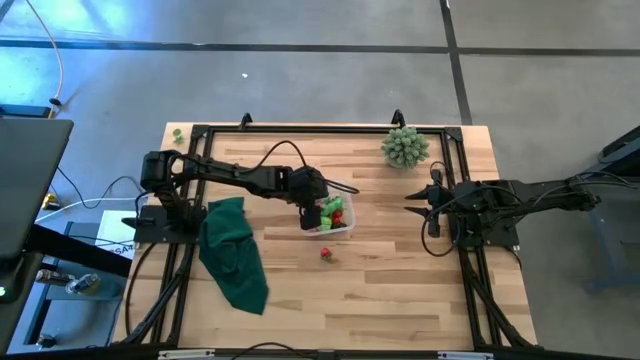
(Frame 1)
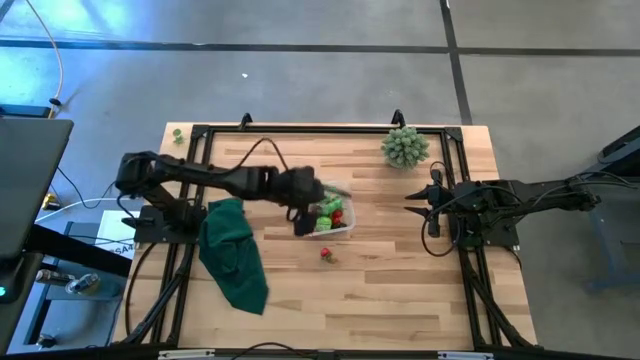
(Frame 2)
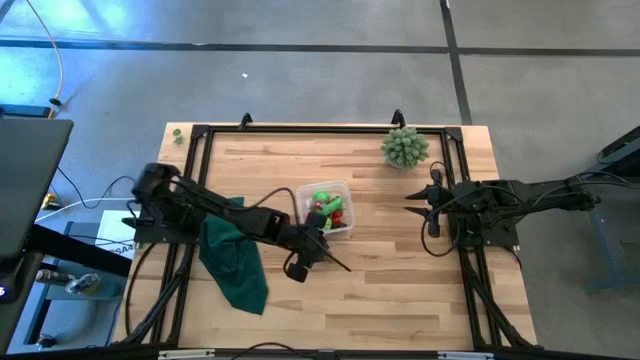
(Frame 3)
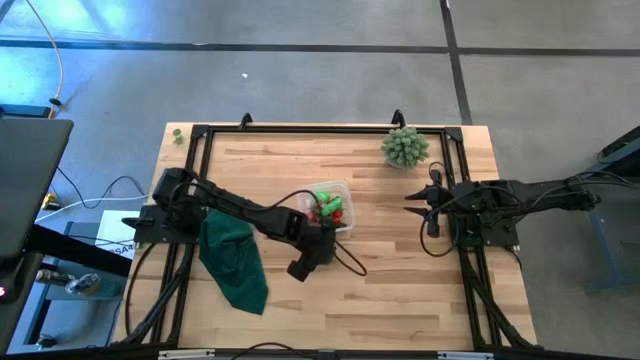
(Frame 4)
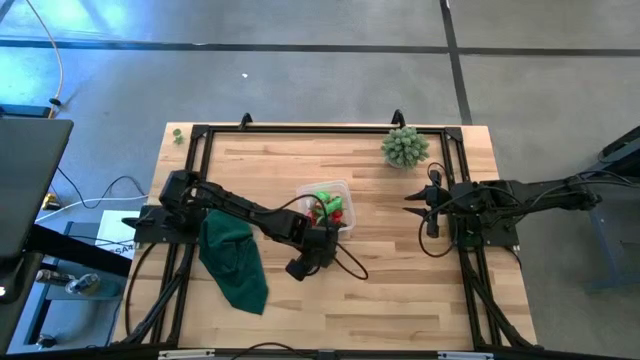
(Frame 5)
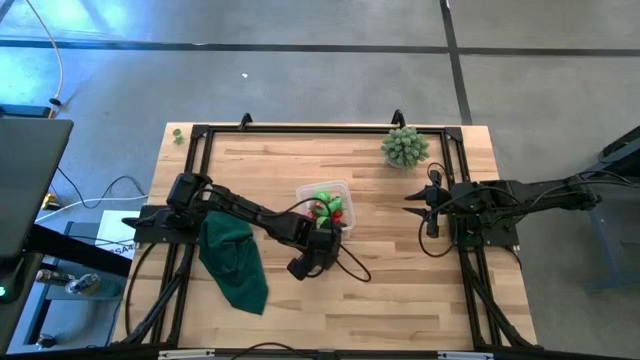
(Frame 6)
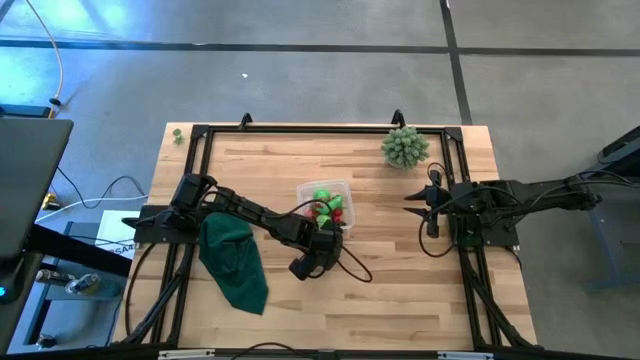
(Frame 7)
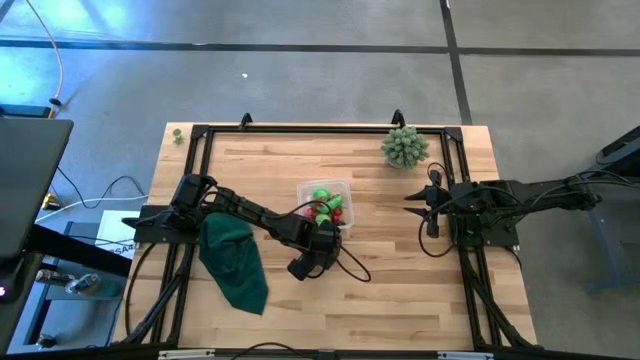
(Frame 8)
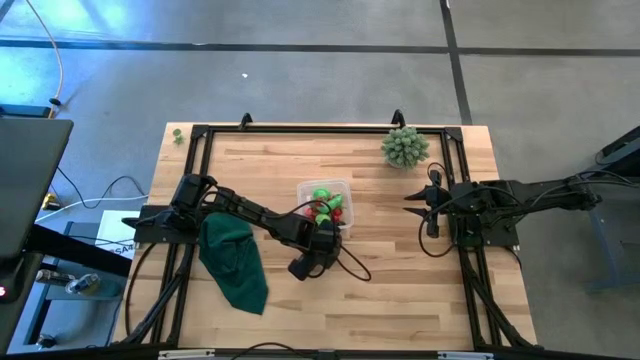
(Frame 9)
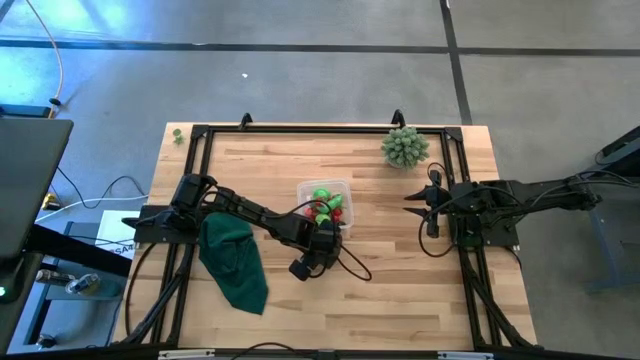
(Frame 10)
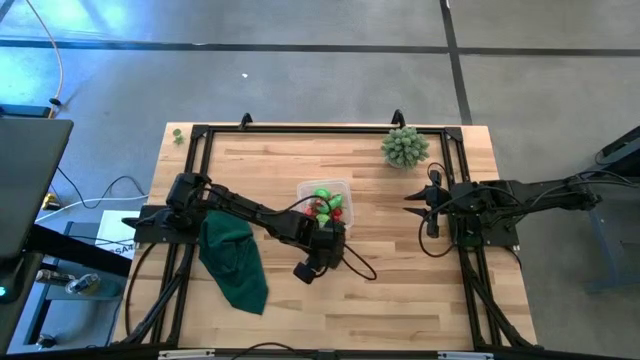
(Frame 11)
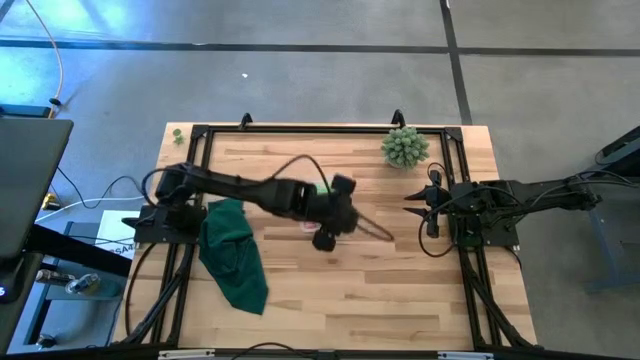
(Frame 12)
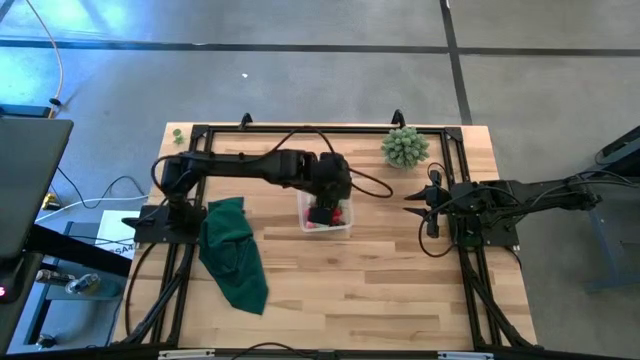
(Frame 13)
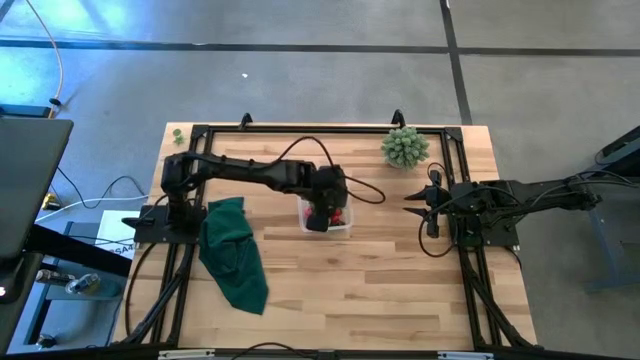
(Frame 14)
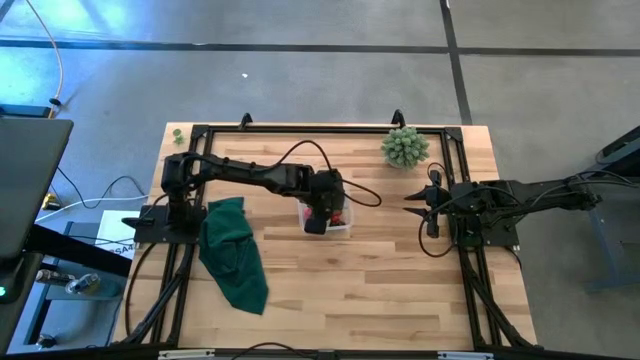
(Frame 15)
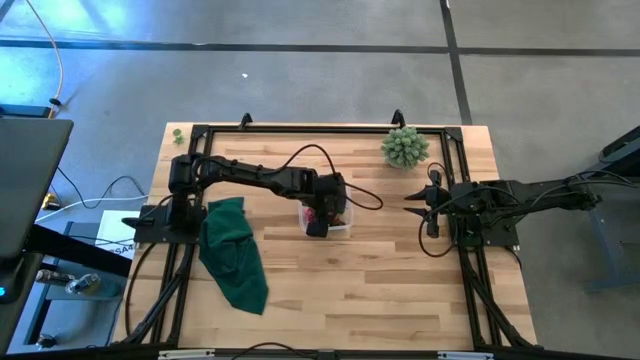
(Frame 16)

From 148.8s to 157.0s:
Task: Pick and placing Produce into tupperware
Put the strawberry into the transparent bin

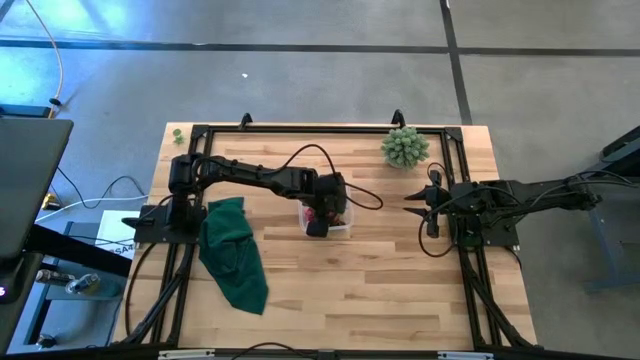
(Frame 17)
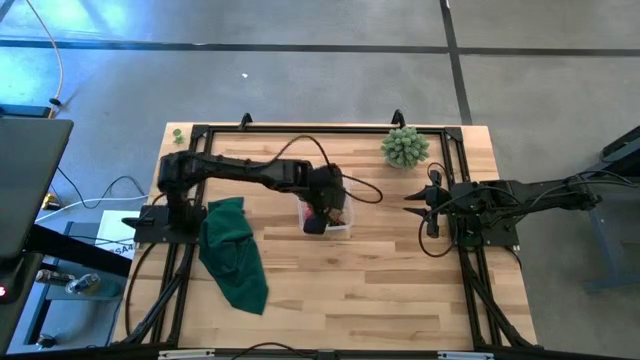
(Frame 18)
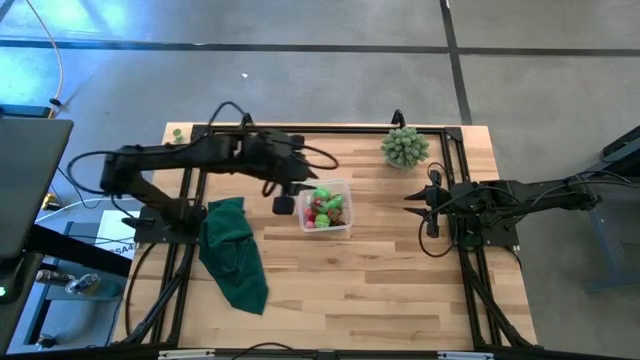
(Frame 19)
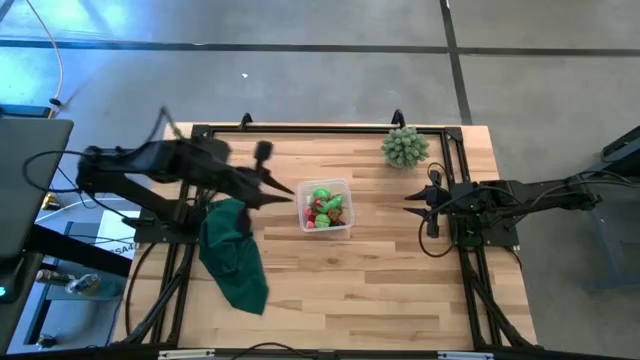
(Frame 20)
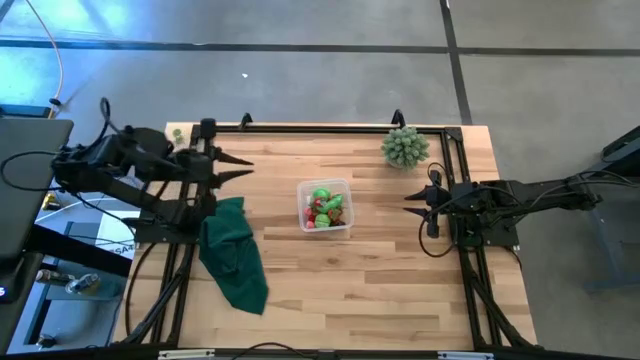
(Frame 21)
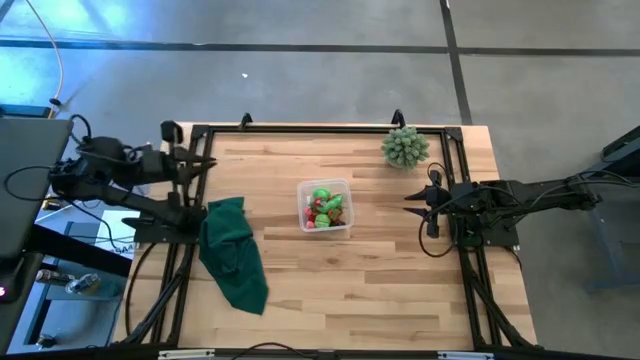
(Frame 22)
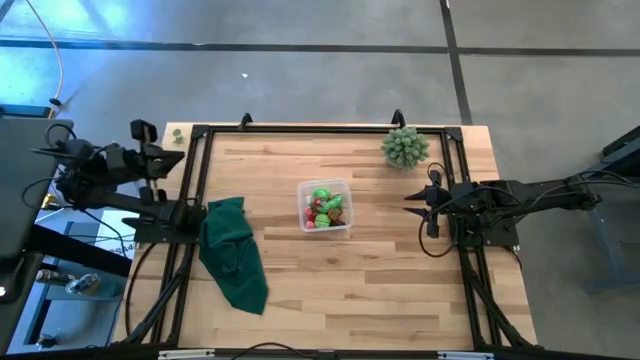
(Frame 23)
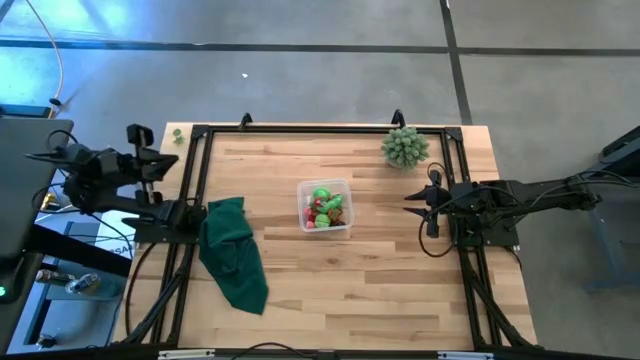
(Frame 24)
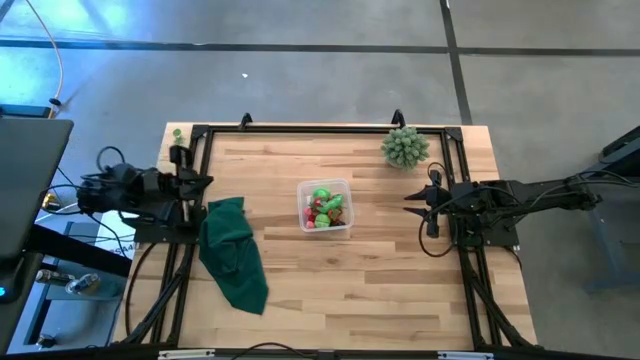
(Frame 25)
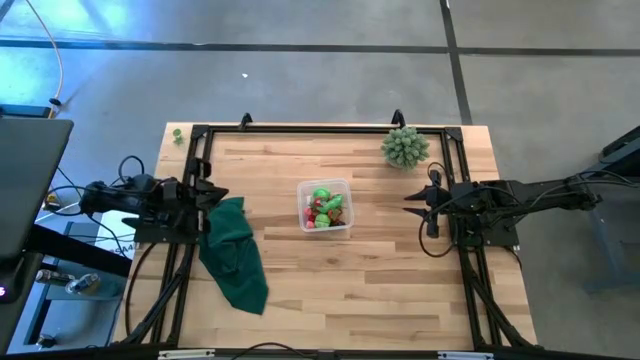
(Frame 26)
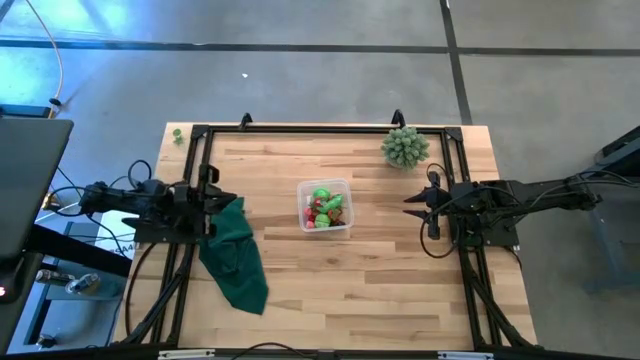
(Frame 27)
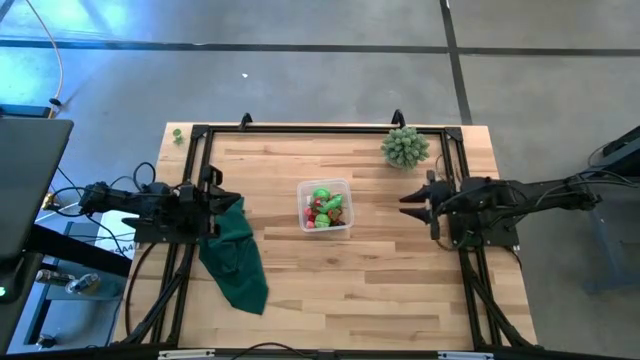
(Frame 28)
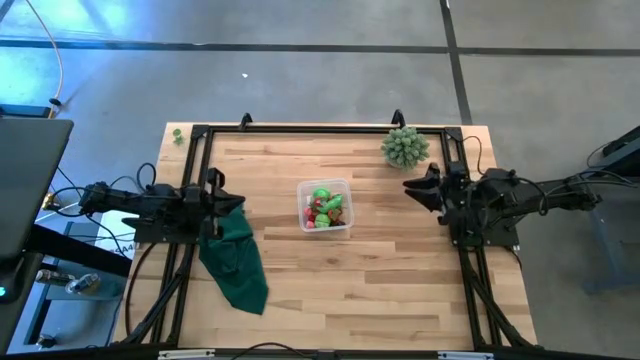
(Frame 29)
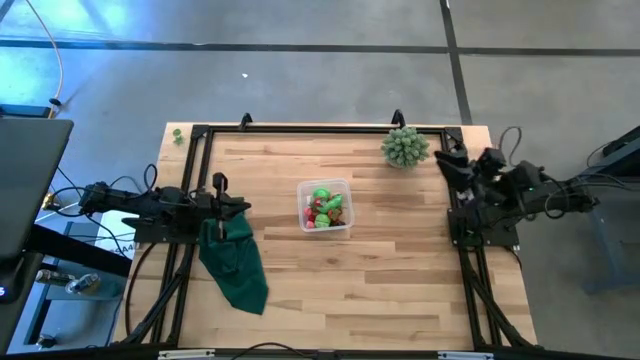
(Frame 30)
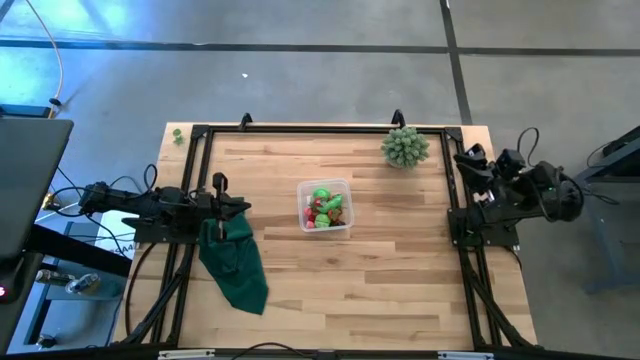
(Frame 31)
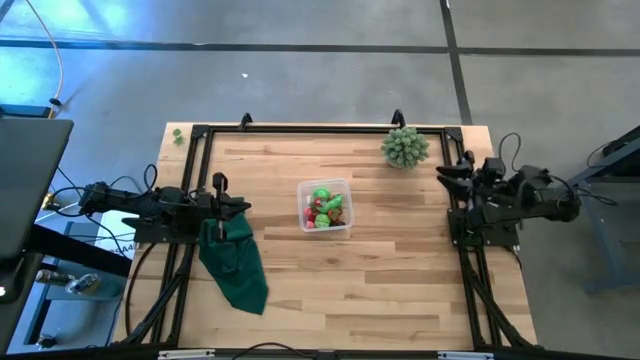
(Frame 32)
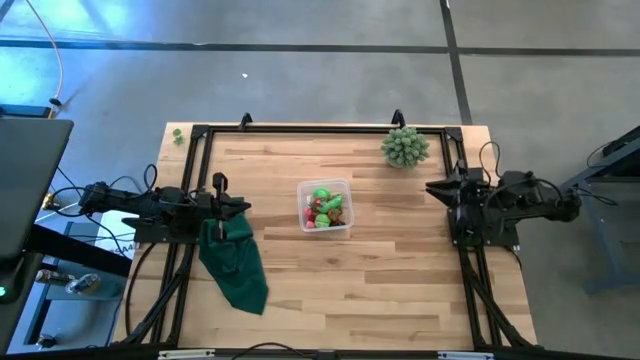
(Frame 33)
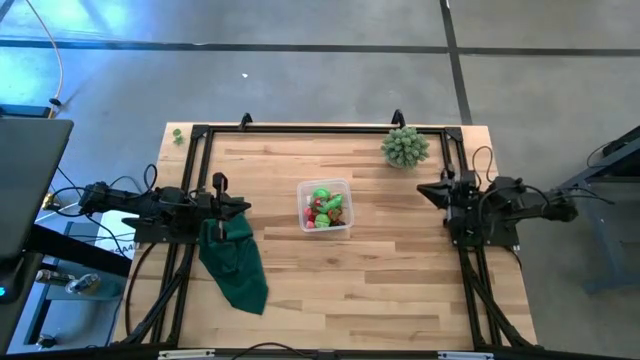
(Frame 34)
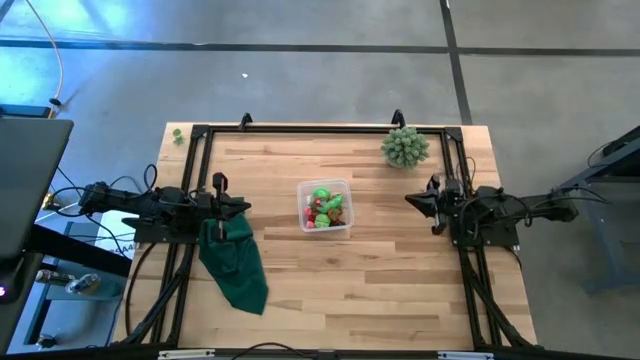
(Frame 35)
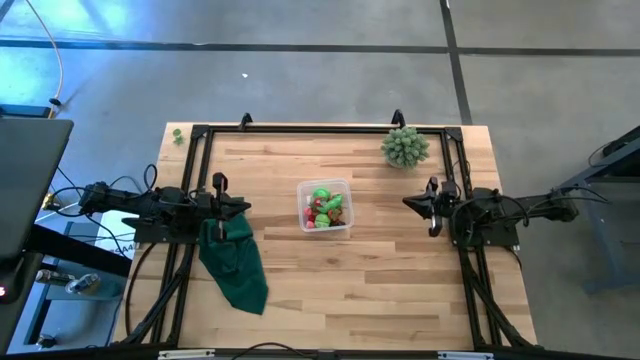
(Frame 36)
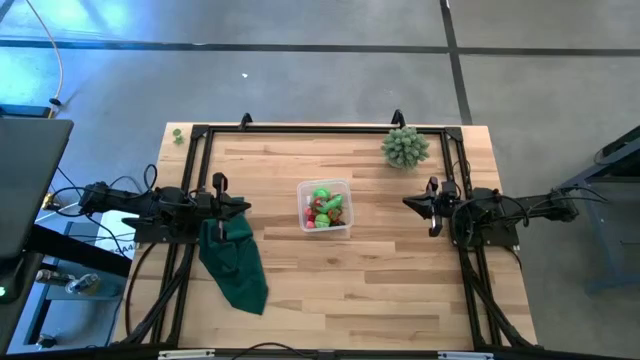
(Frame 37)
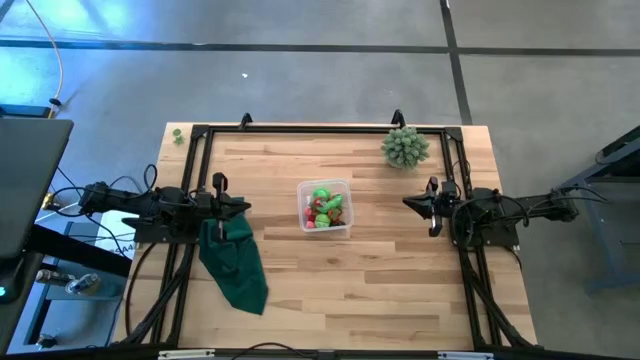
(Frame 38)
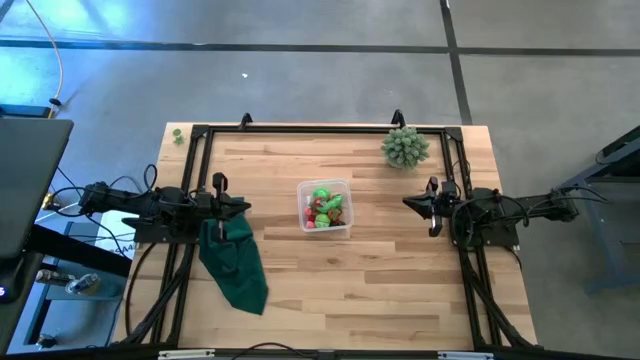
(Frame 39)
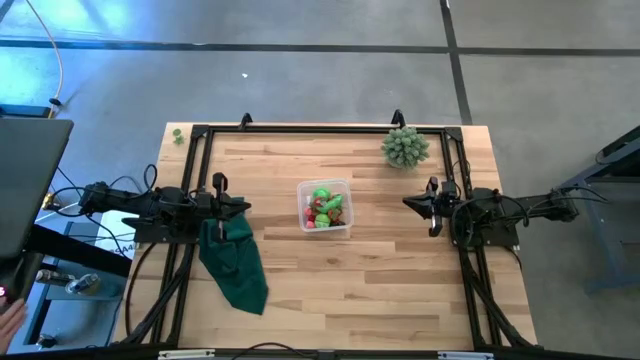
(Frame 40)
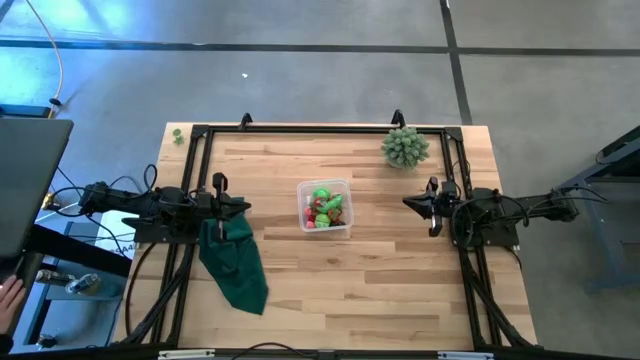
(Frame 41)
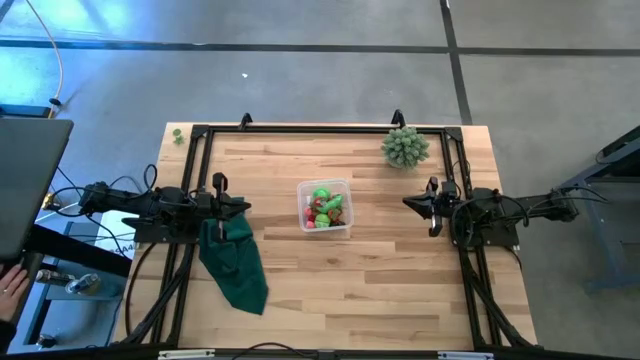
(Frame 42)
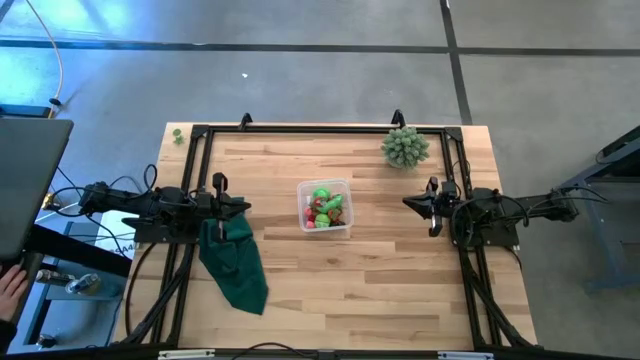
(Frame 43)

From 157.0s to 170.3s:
Return to Home Position

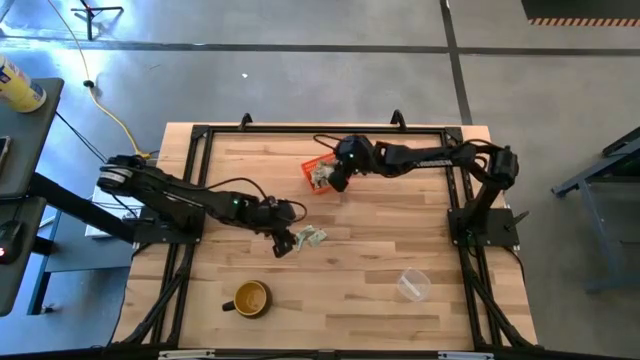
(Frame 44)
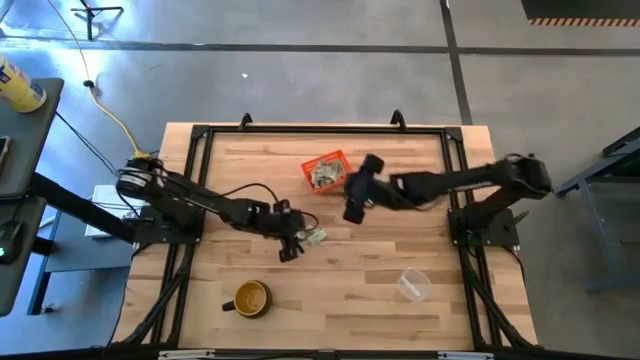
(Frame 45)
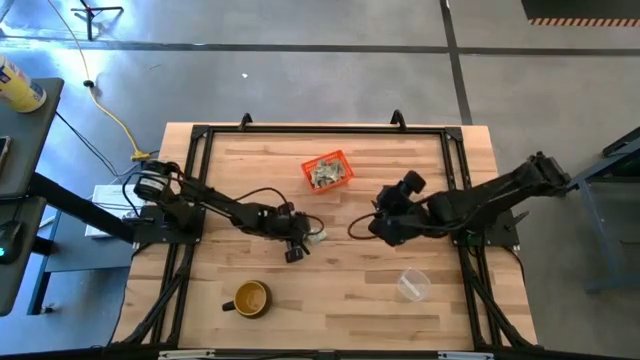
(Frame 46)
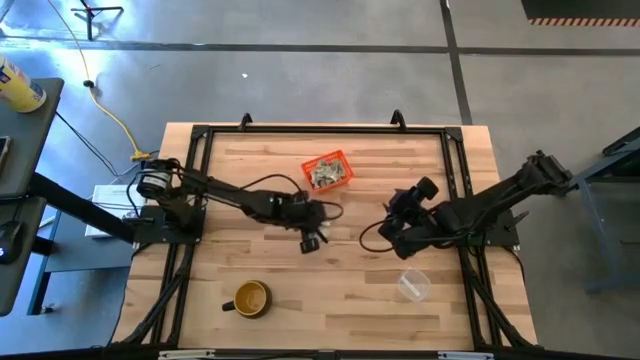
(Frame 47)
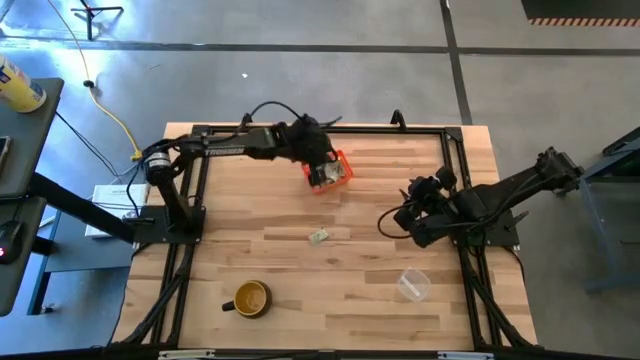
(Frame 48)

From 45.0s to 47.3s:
Task: Pick and place items into bin
Put the white stevia packet into the orange bin
